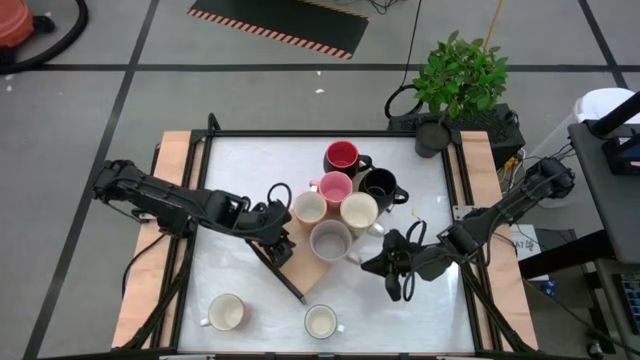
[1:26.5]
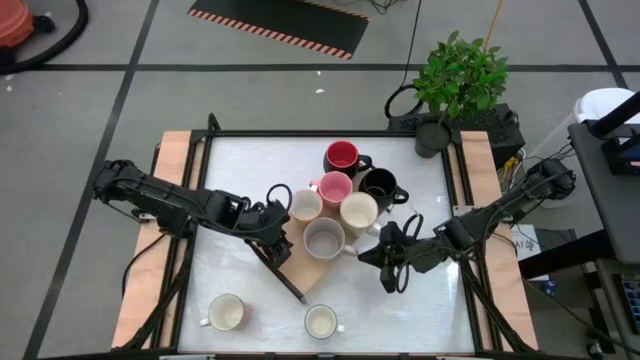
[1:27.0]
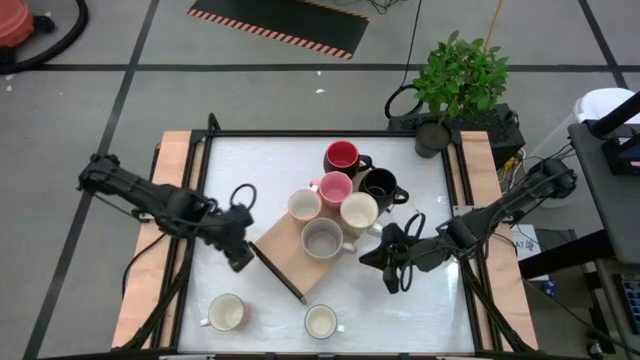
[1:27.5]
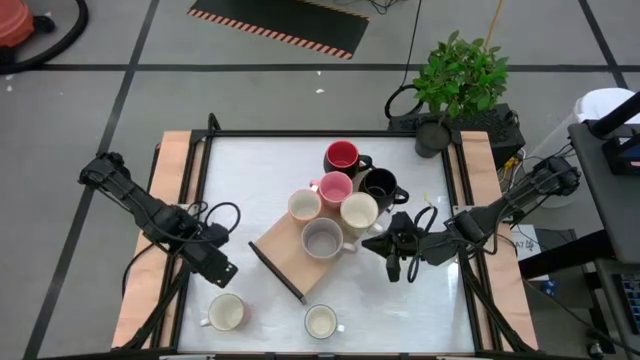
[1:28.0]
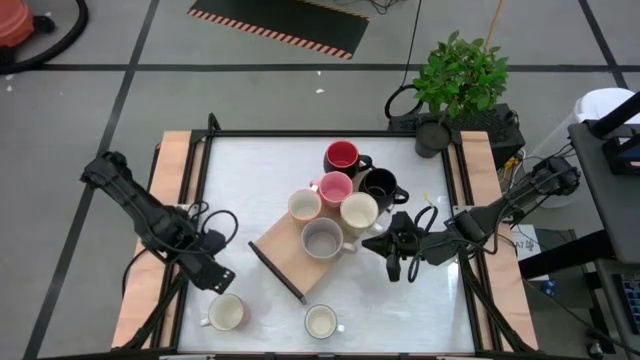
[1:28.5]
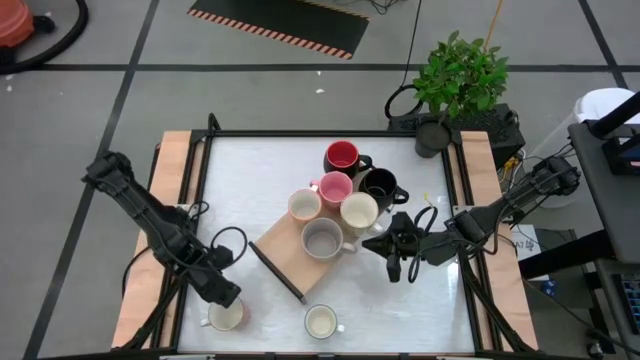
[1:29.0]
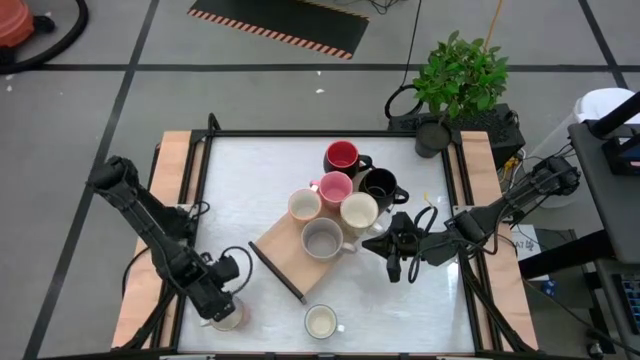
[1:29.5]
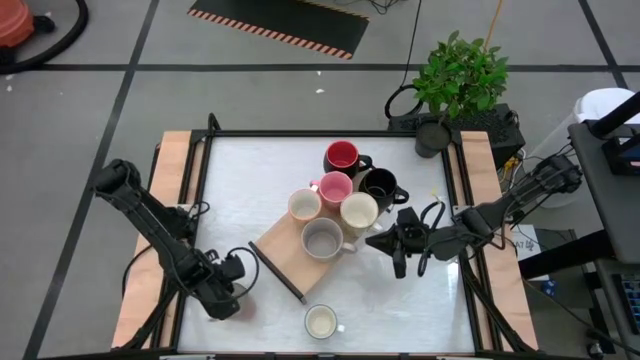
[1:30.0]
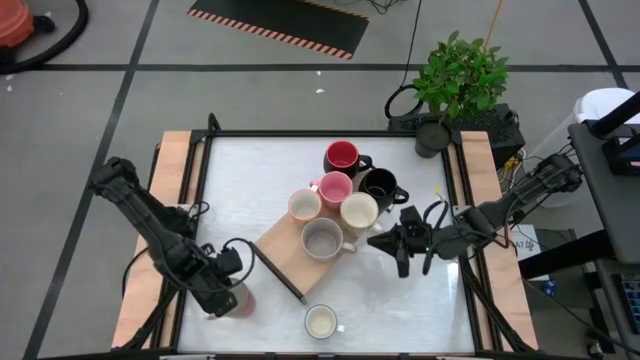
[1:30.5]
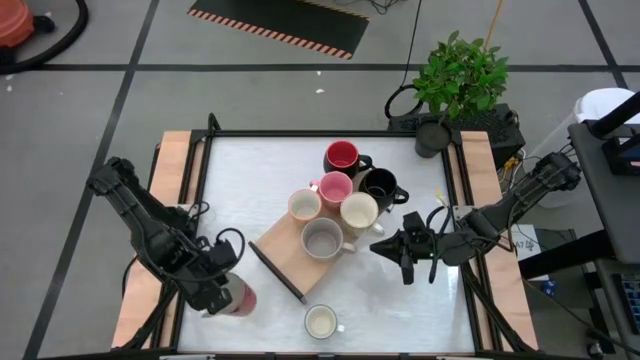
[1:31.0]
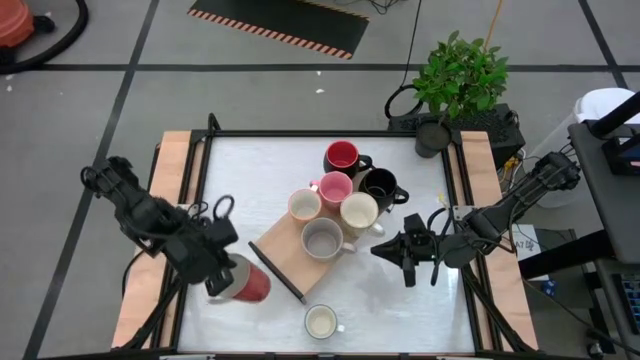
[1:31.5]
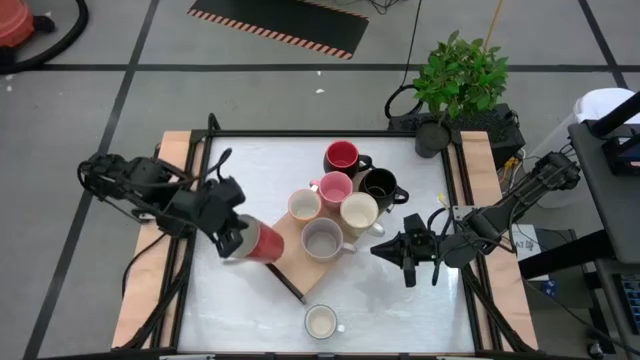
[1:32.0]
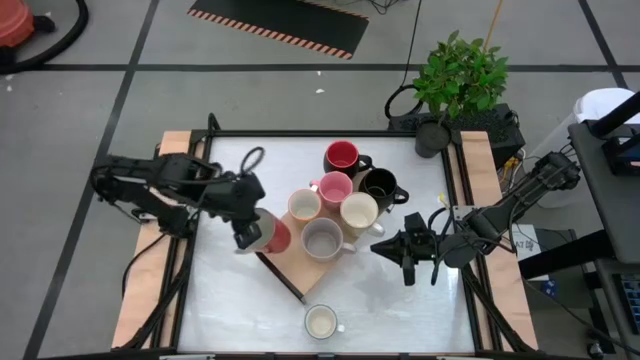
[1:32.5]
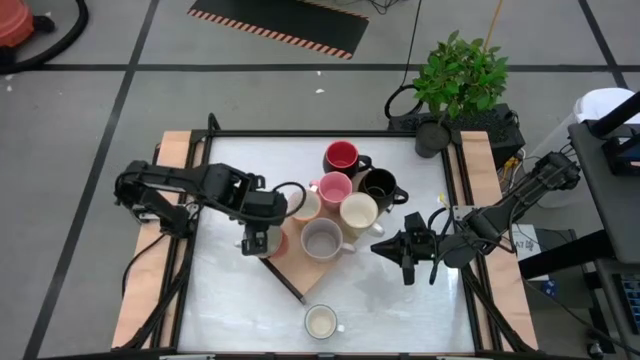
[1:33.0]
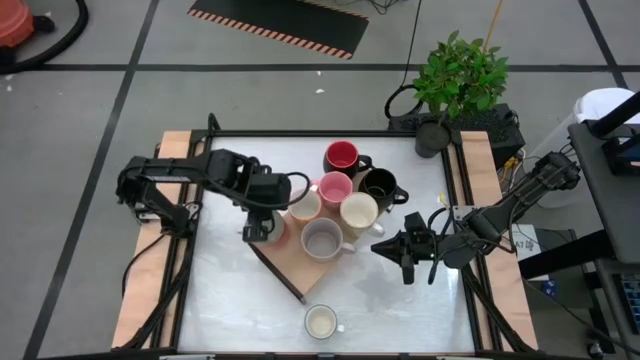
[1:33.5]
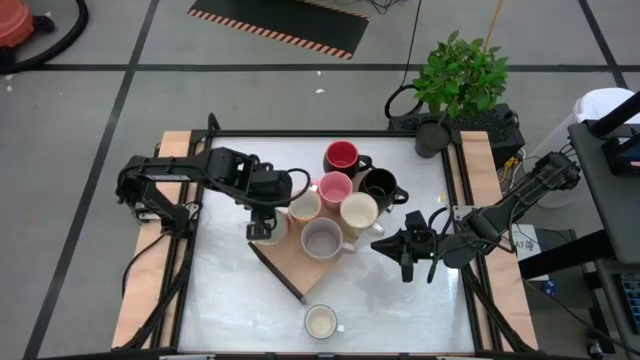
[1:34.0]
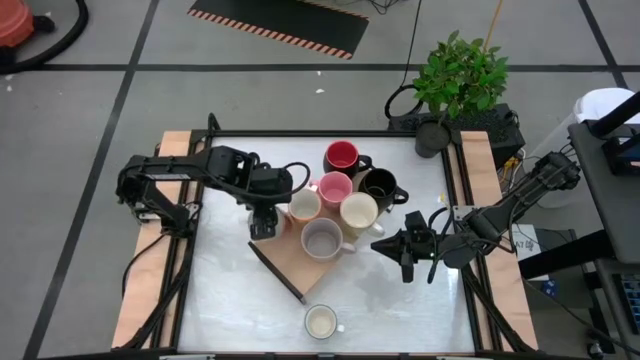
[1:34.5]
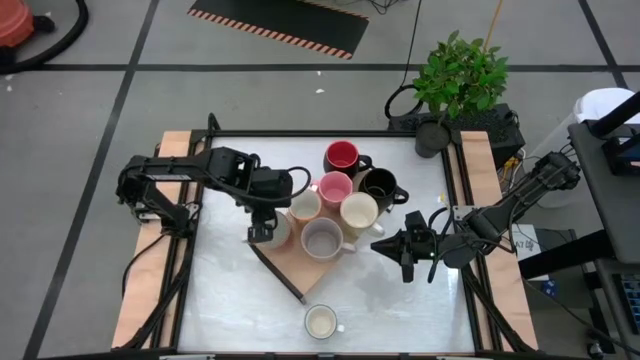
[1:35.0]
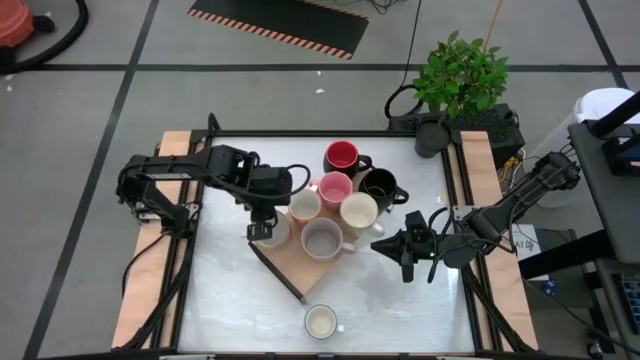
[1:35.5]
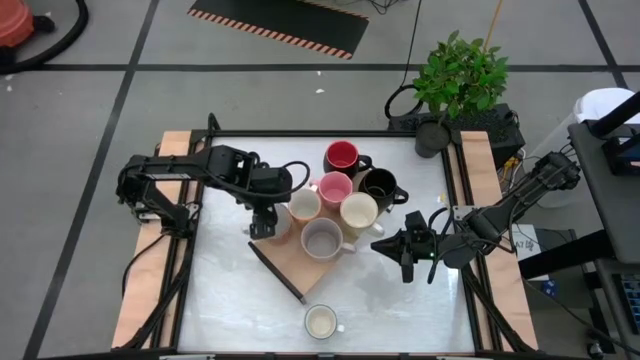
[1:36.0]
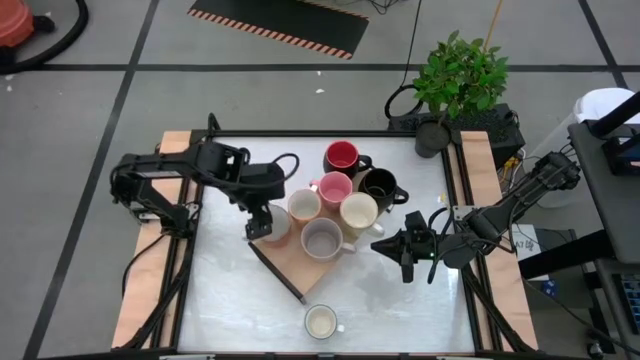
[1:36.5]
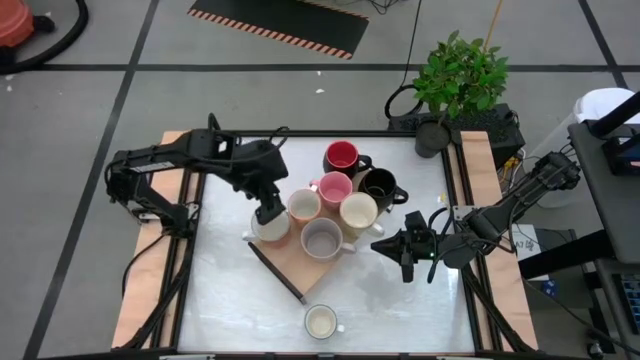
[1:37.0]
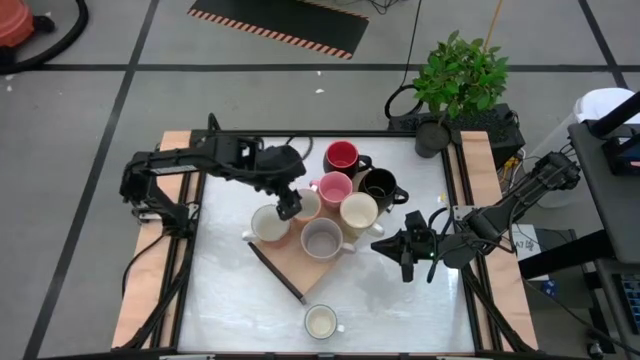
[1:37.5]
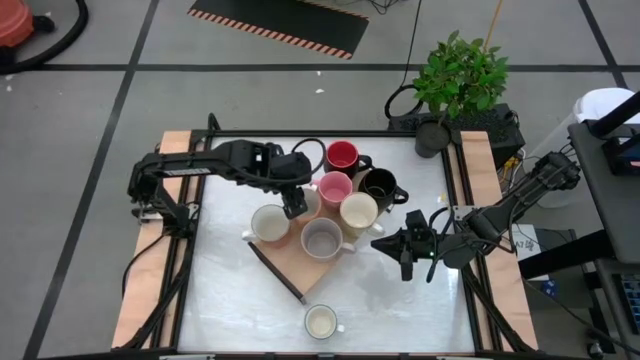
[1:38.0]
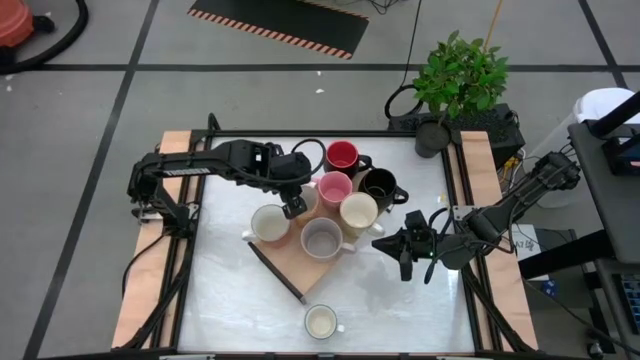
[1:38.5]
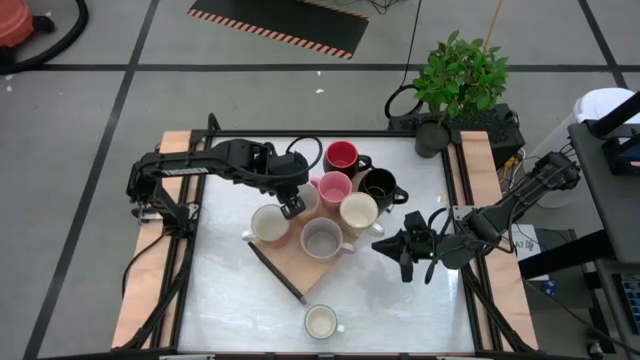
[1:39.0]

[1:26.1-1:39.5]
Task: Place coffee mugs
Put the red mug on top of the shelf

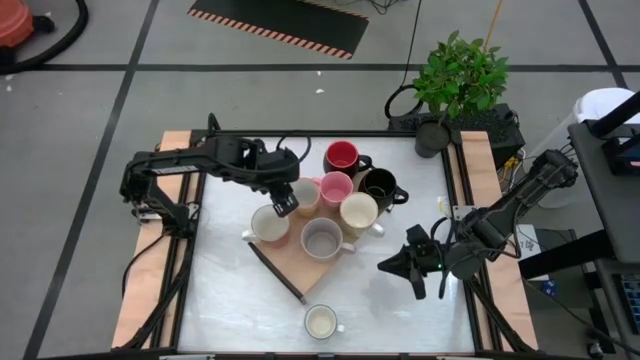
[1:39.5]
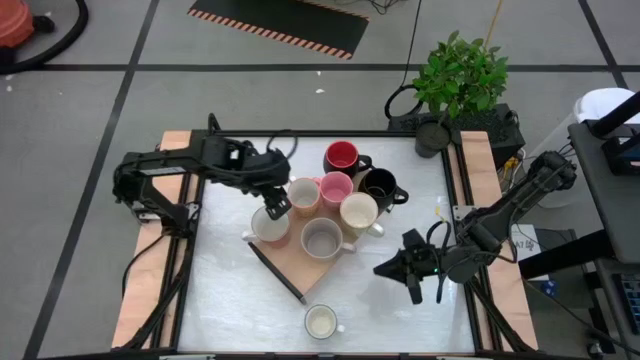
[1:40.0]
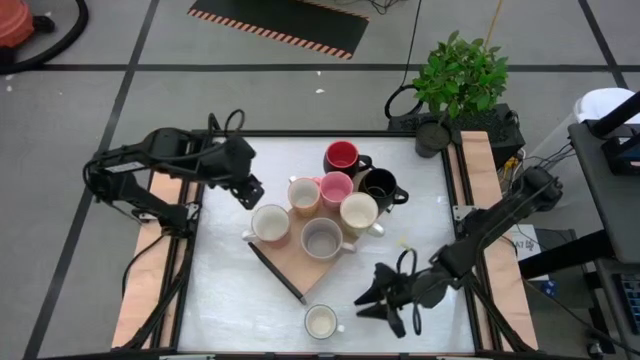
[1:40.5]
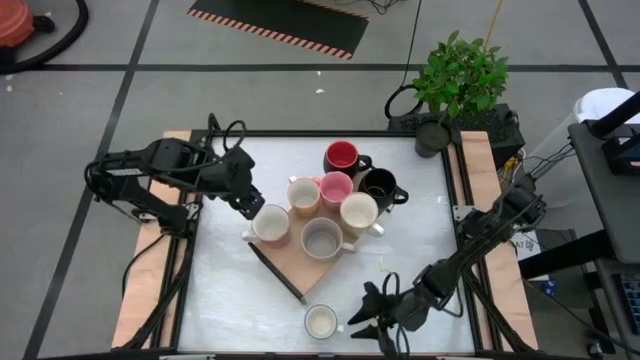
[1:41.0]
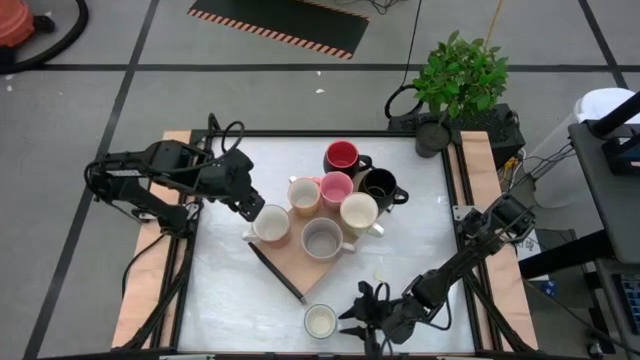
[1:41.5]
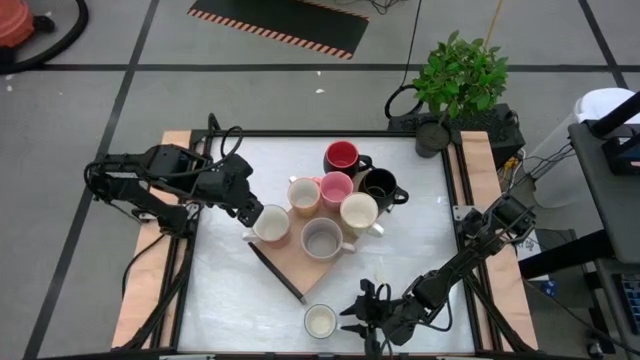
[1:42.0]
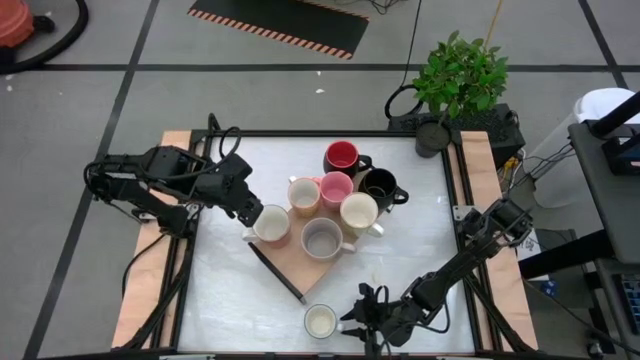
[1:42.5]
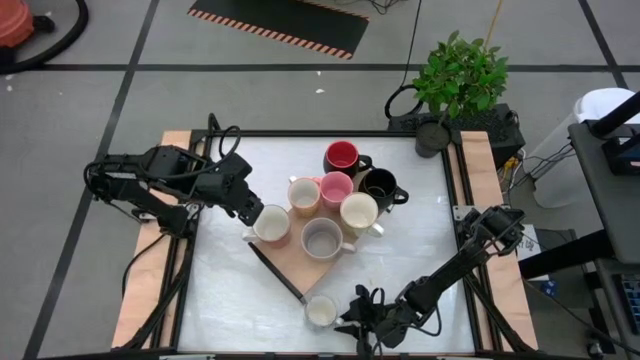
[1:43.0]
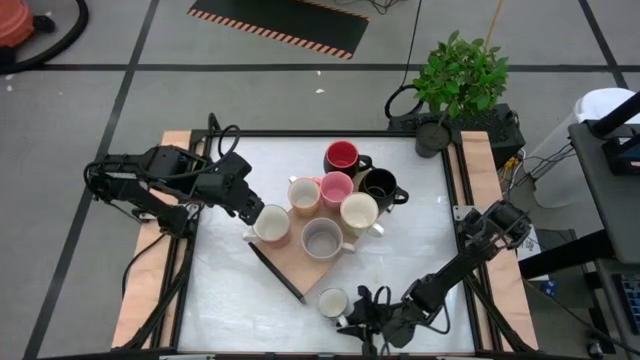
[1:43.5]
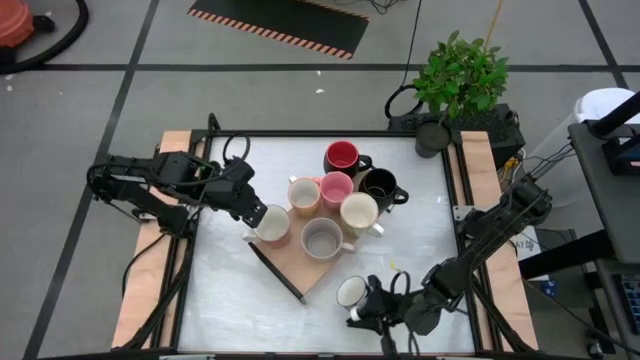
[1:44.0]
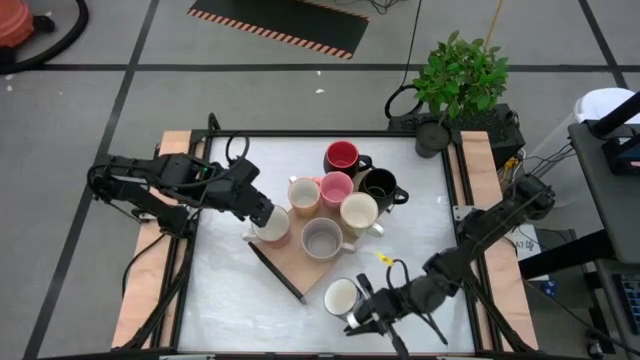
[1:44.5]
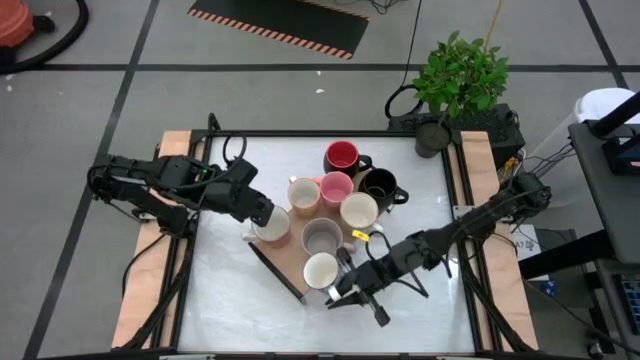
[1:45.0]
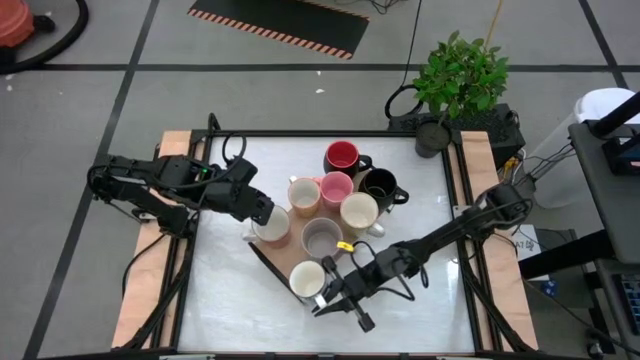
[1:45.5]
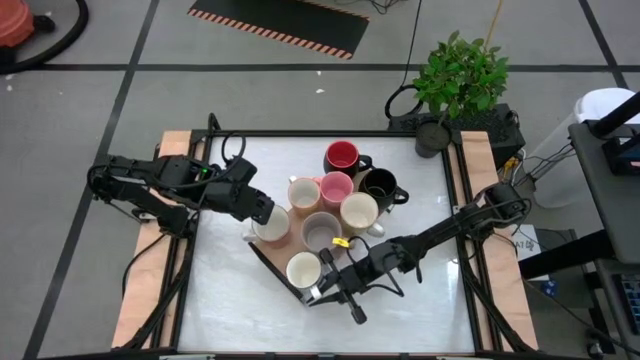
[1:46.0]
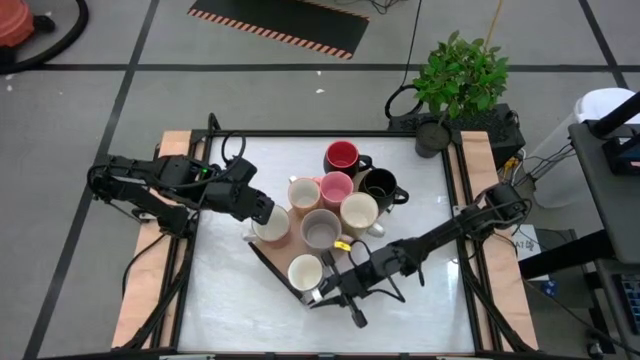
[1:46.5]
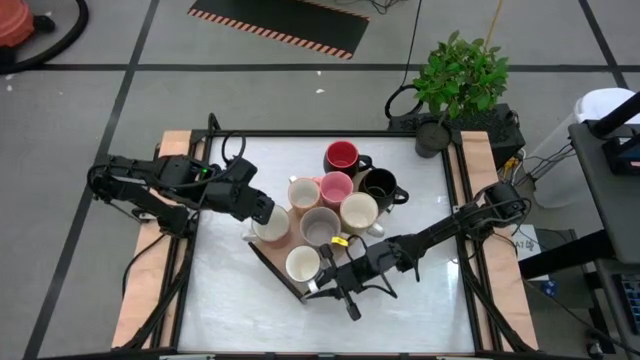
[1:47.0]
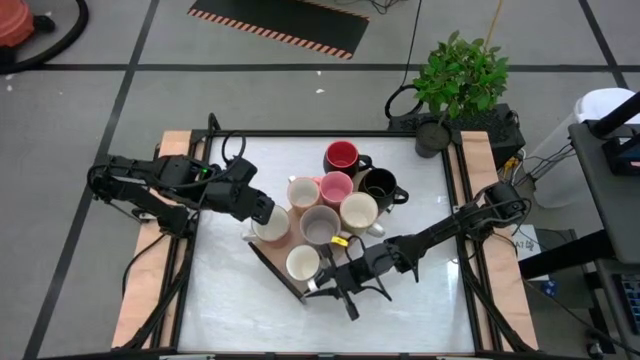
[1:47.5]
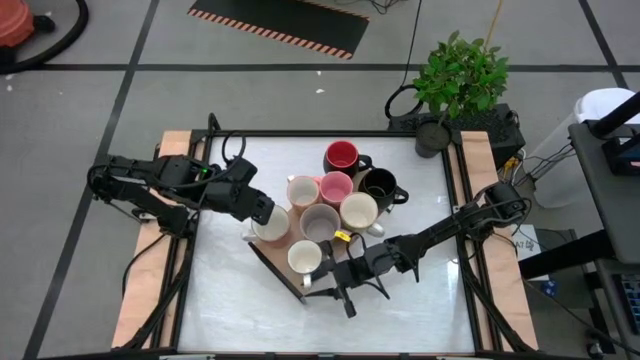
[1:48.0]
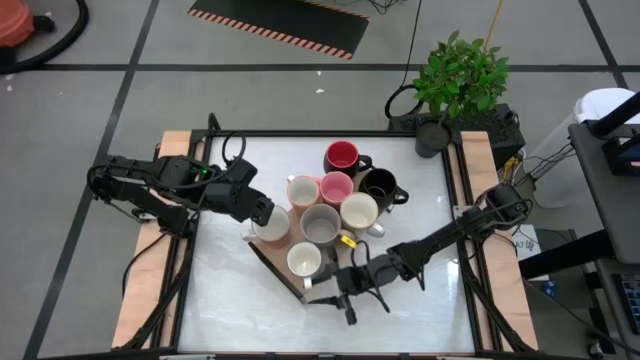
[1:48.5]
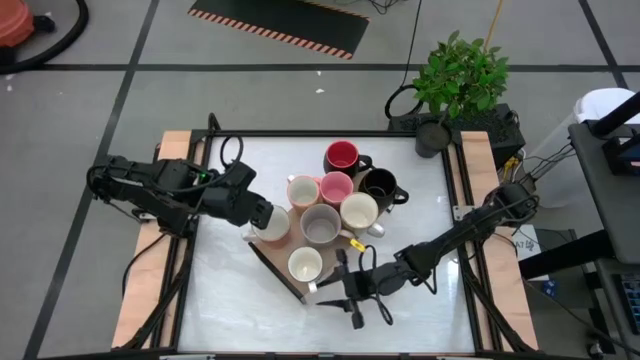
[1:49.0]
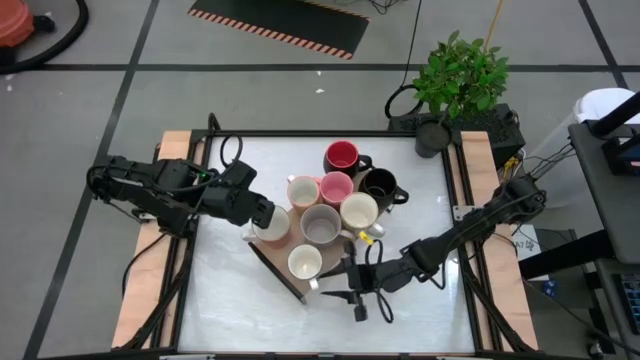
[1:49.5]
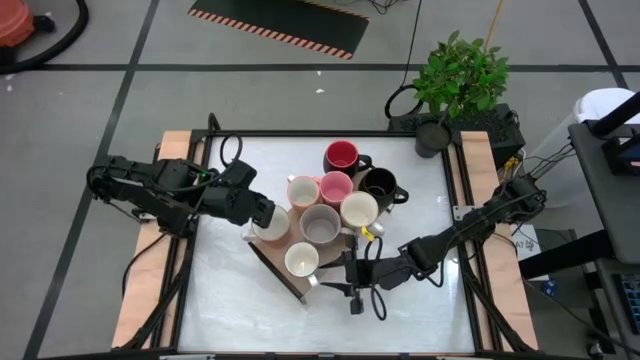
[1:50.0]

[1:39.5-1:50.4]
Put the blue mug on top of the shelf
